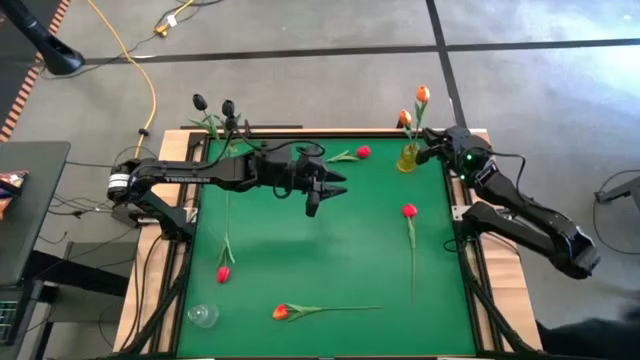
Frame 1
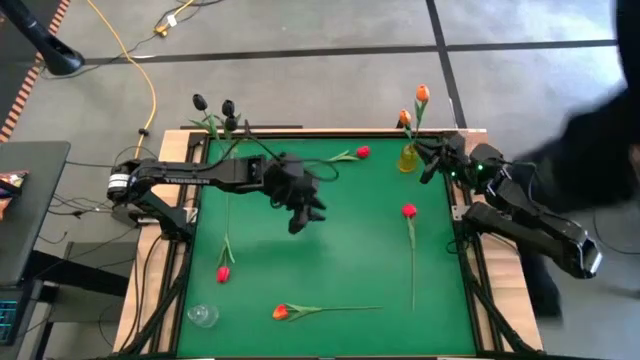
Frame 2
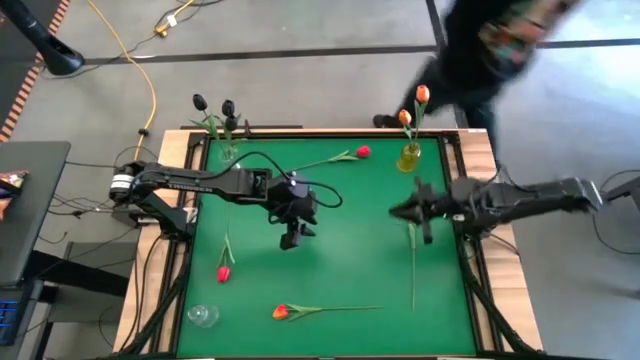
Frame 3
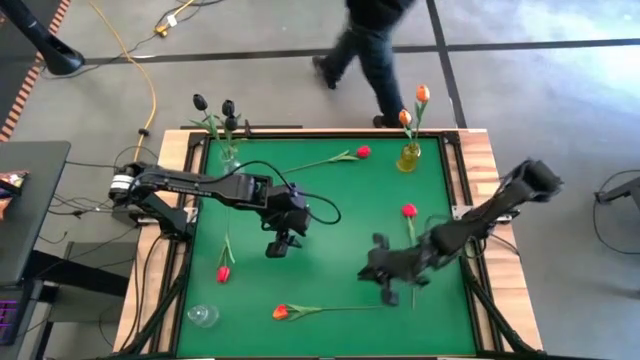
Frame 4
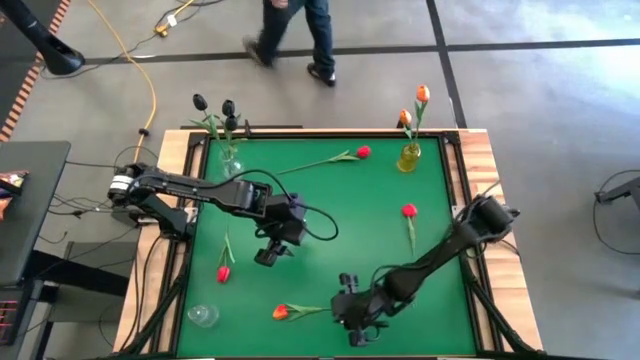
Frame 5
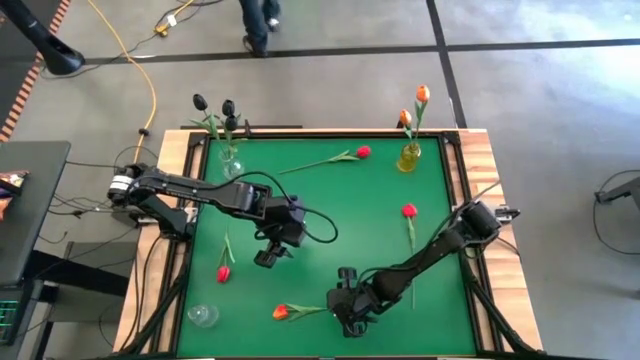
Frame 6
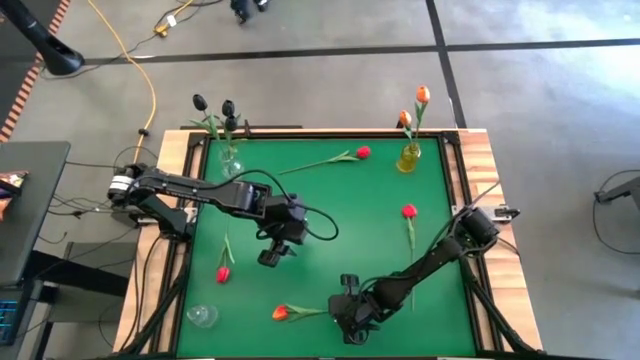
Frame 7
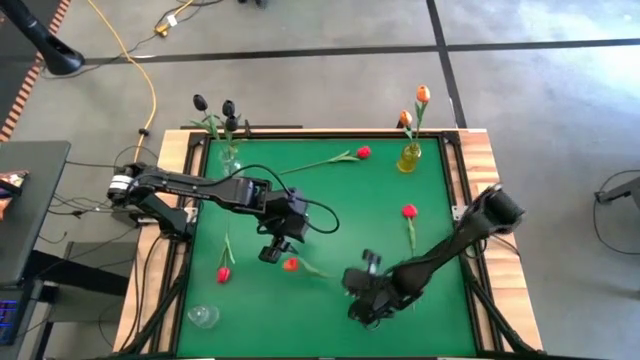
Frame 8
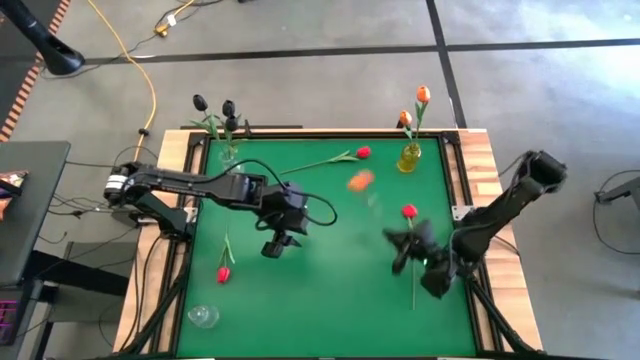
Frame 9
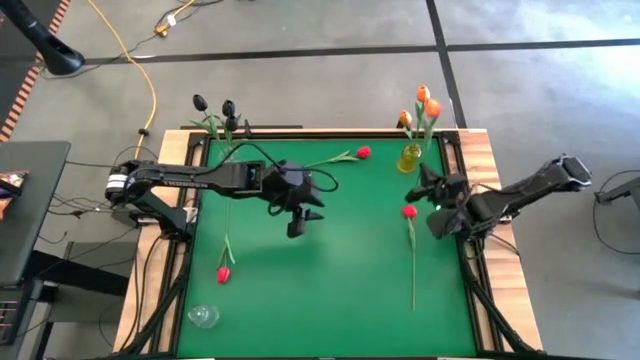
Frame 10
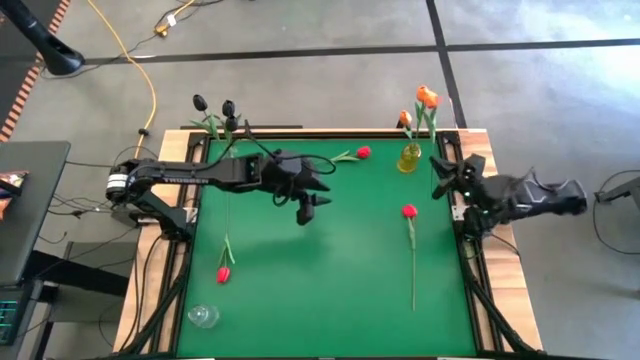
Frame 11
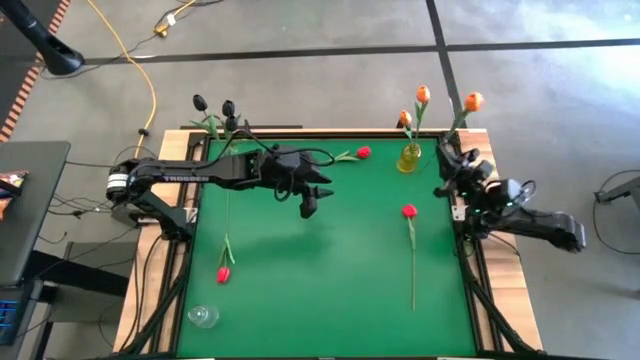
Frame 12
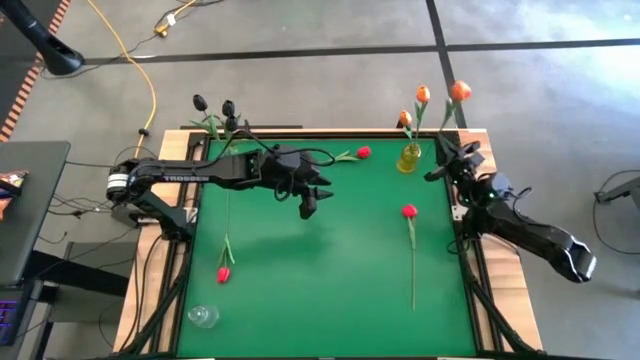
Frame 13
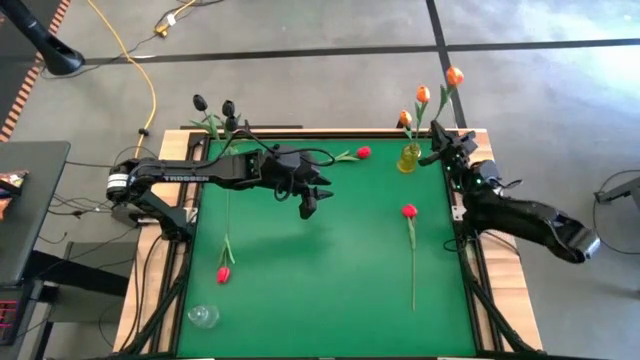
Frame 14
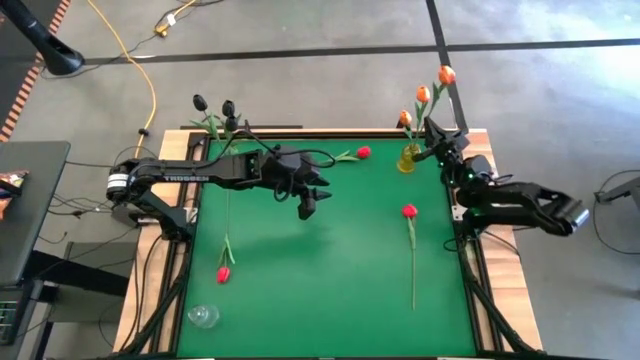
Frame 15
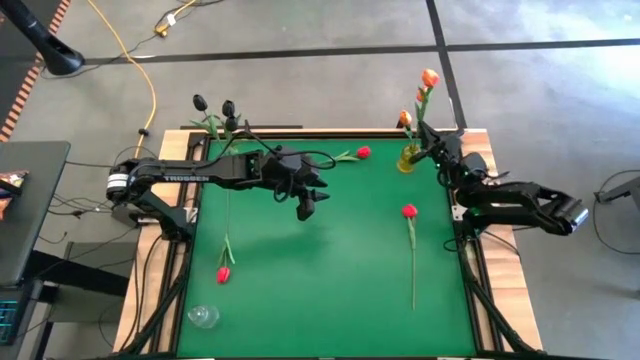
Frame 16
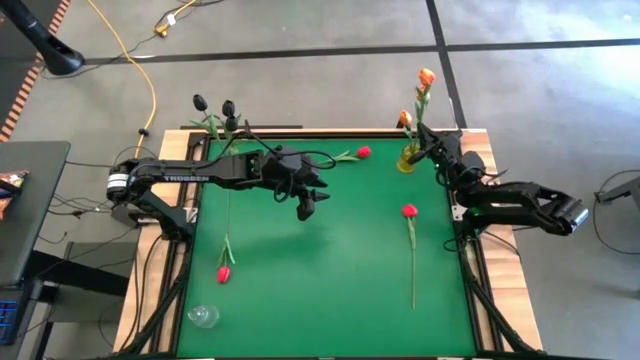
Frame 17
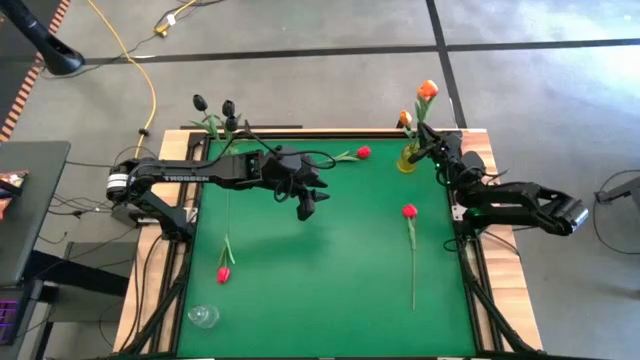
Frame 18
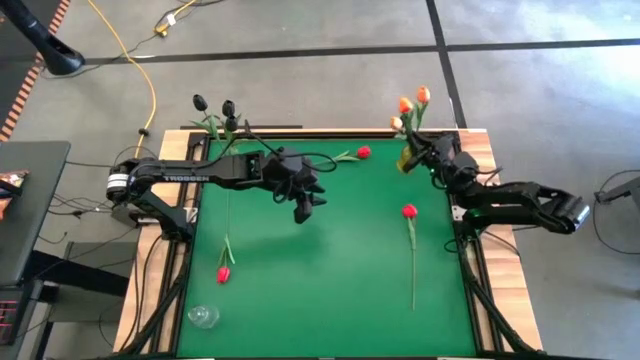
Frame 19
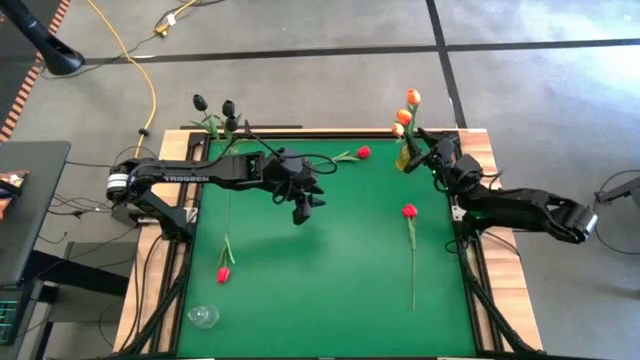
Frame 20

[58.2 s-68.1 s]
Task: Sort flowers into vase by color
Put the orange flower into the yellow vase

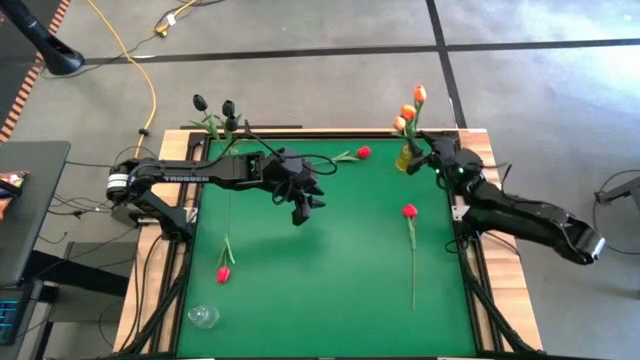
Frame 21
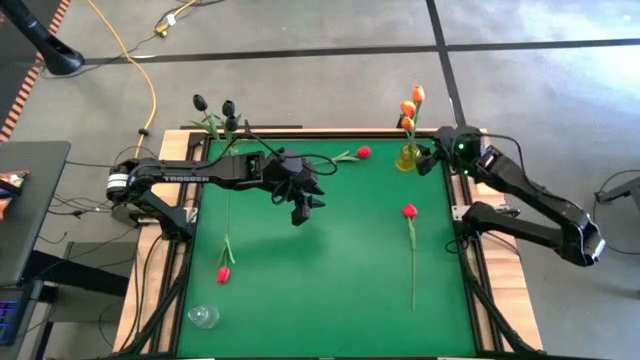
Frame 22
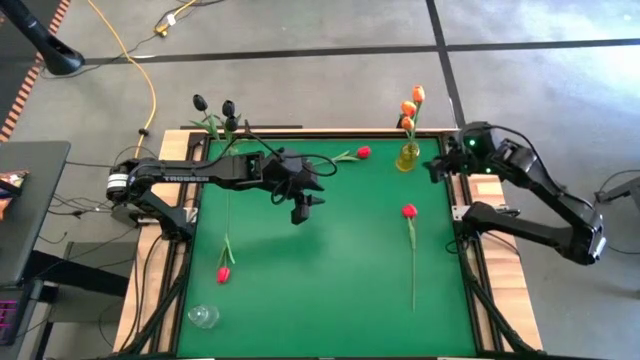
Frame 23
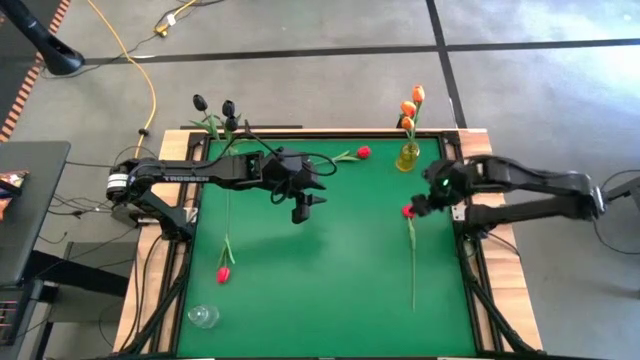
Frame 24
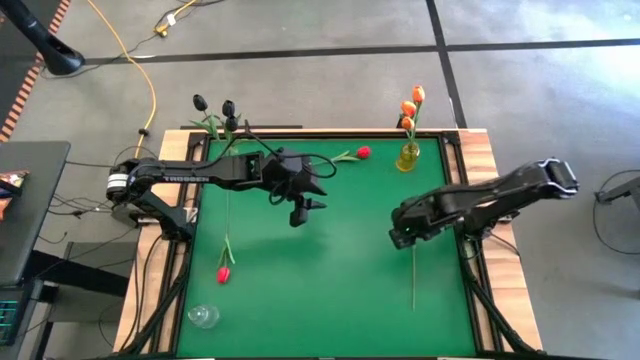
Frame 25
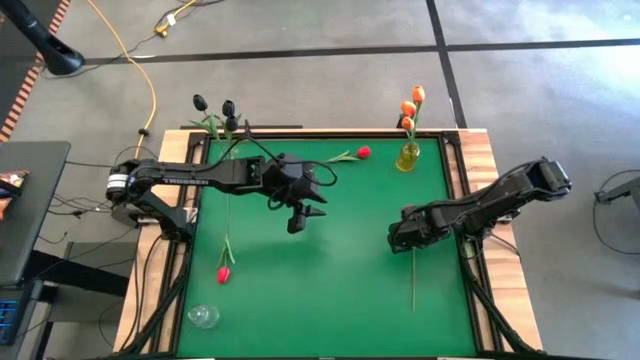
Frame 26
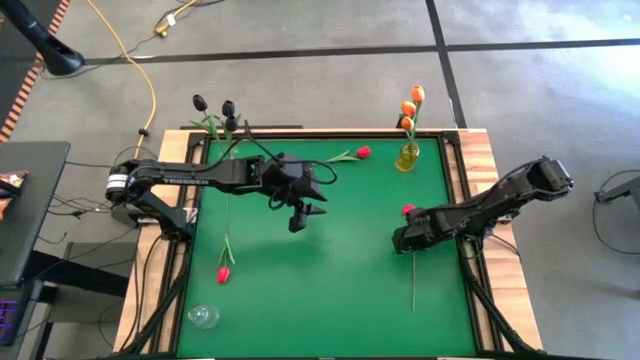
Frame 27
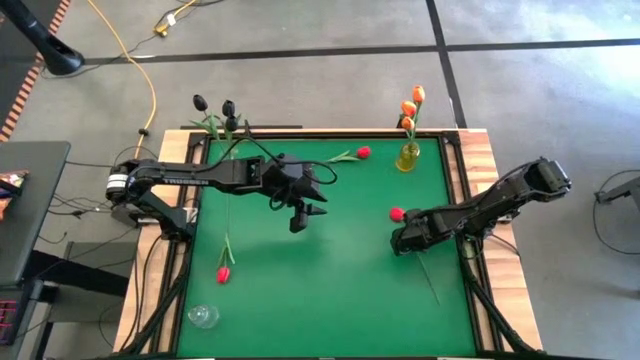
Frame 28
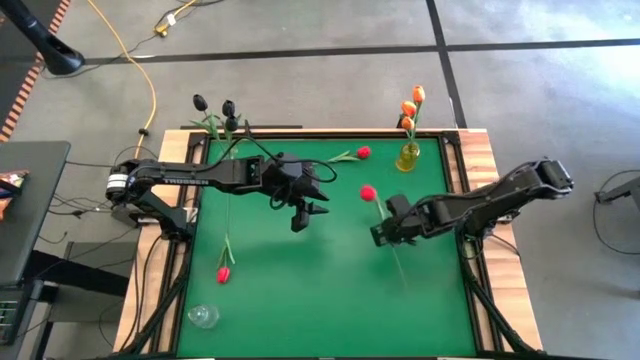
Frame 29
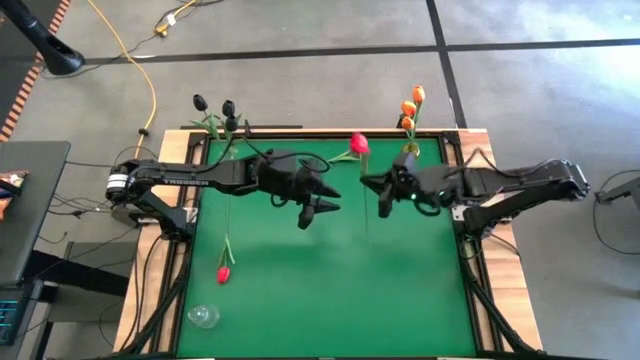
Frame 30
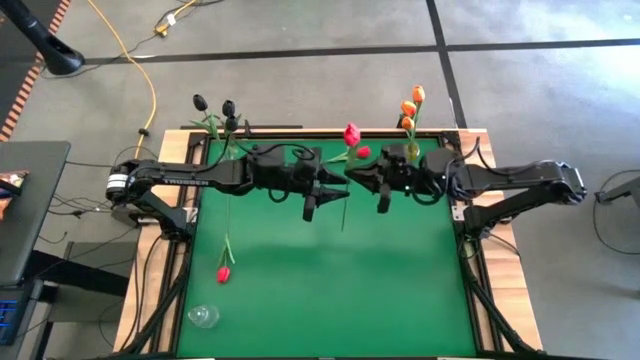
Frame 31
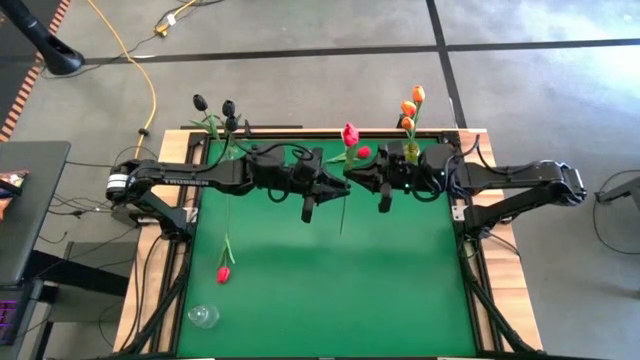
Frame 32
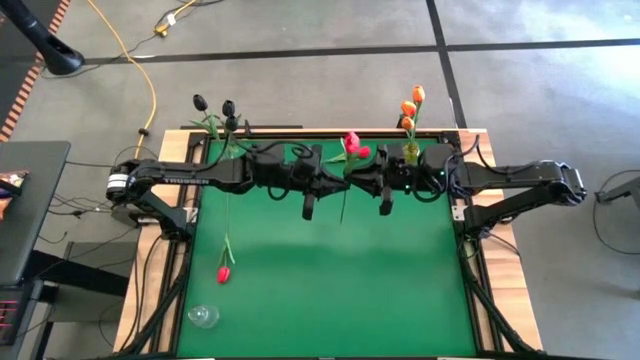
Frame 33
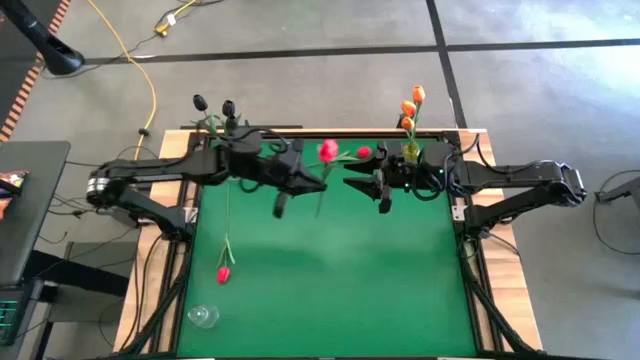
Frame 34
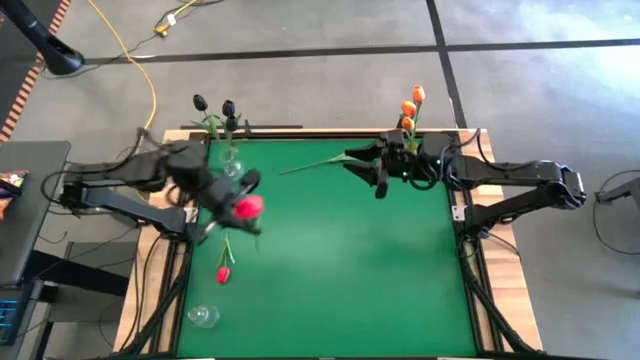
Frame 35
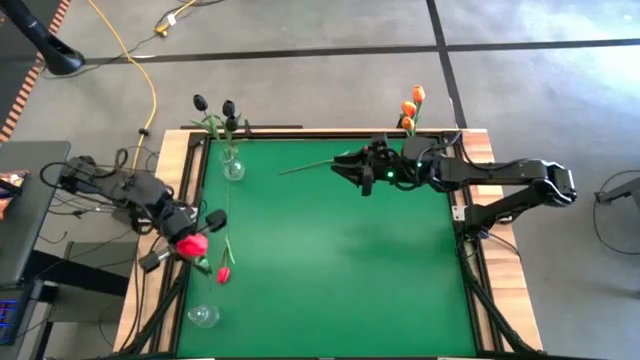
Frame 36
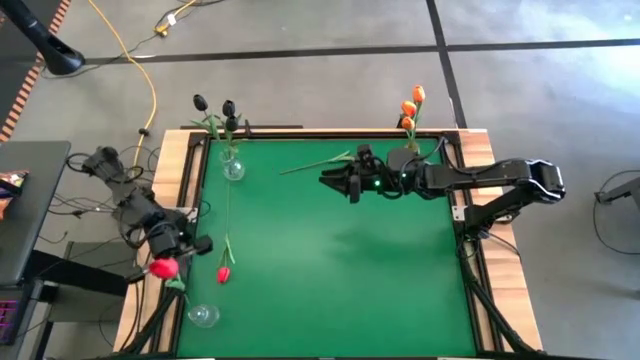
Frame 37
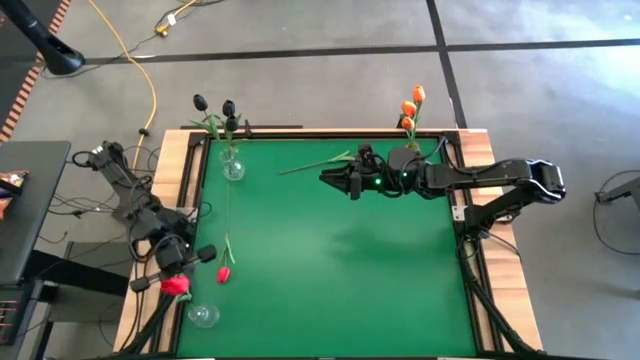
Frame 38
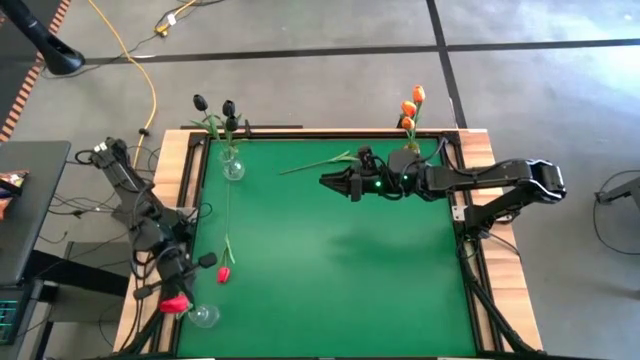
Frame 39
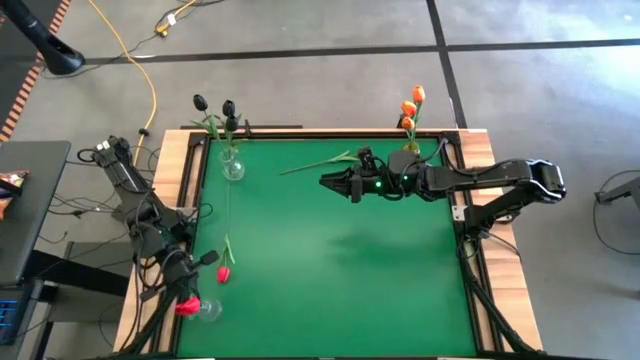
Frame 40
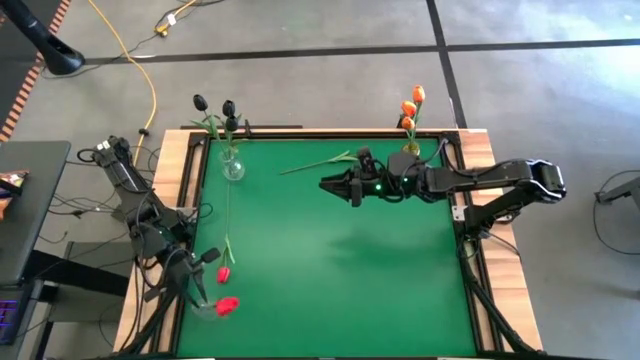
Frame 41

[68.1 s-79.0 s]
Put the right red flower into the bottom transparent vase

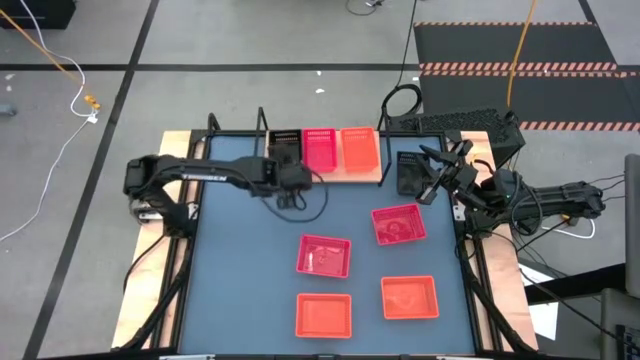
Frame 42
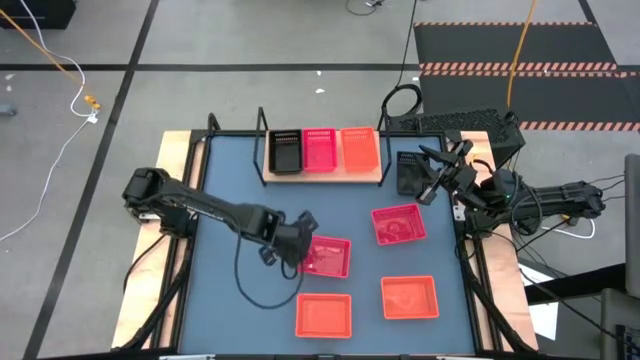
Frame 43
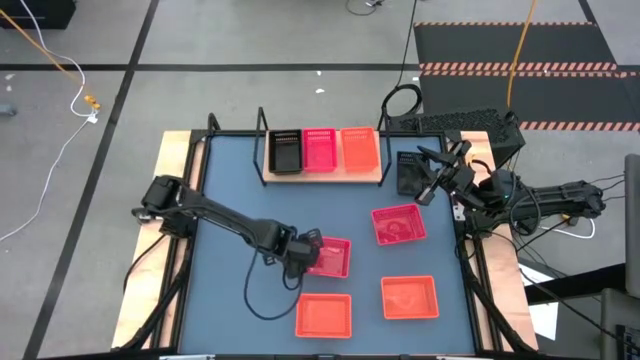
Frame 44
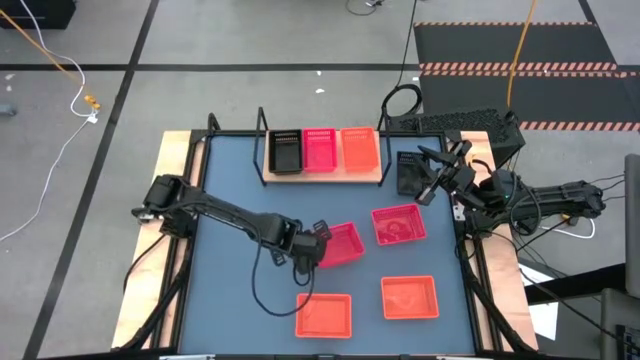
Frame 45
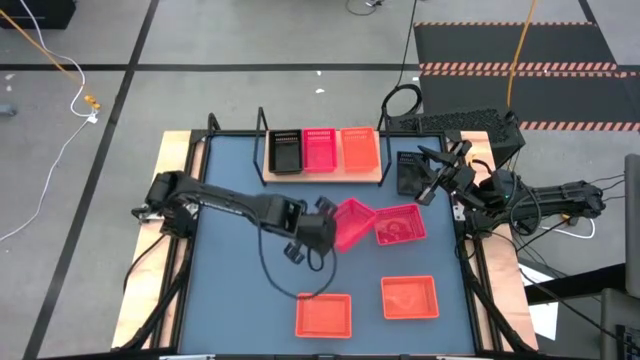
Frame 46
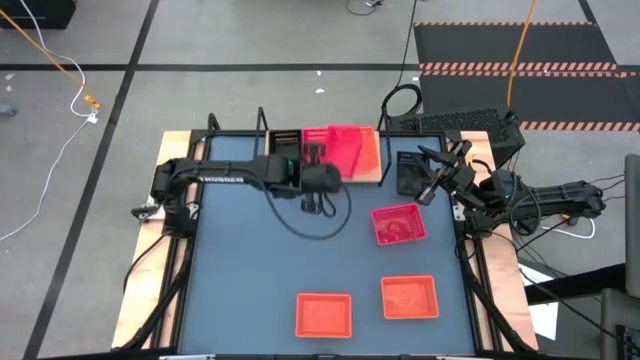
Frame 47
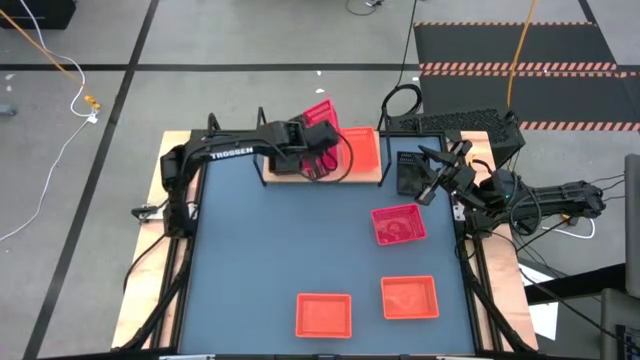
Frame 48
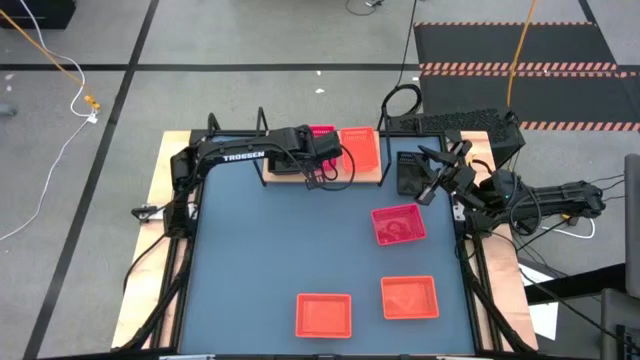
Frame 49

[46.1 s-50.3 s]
Task: Stack baskets on shelf by color
Stack the left red bin on top of the other red bin on the shelf
